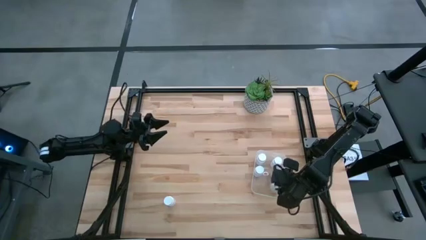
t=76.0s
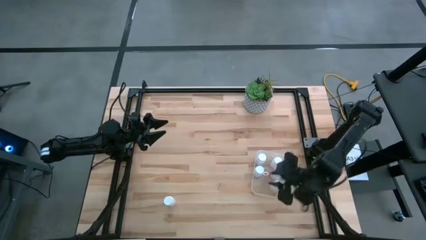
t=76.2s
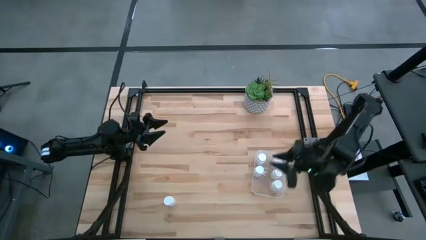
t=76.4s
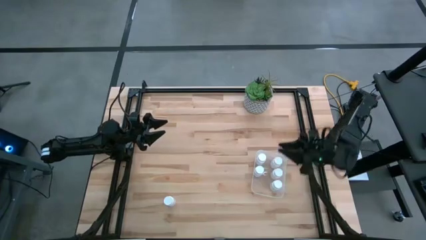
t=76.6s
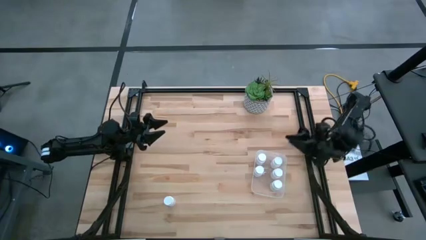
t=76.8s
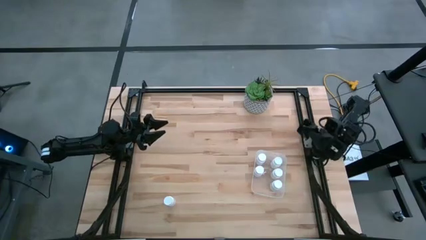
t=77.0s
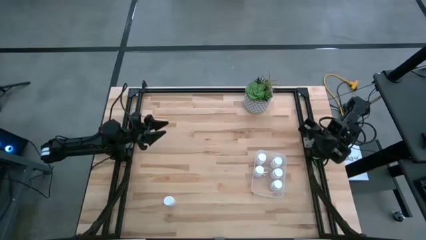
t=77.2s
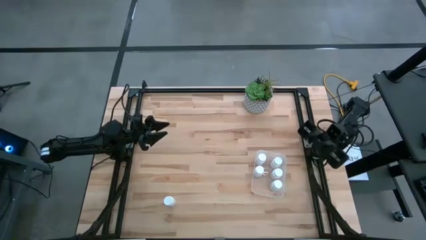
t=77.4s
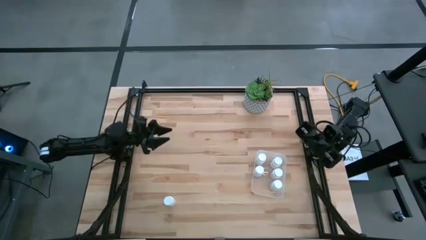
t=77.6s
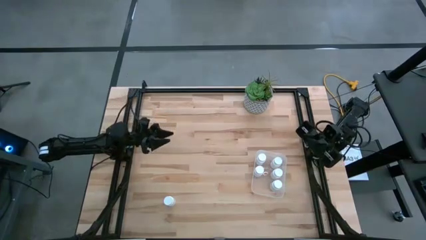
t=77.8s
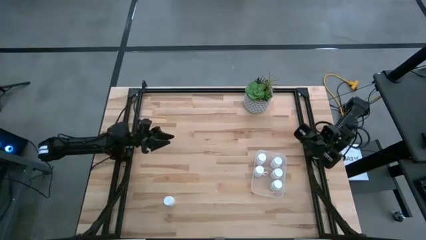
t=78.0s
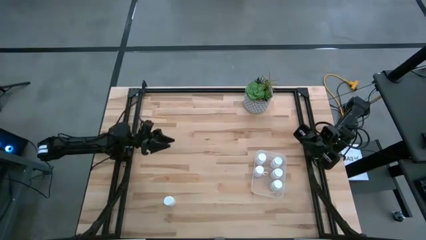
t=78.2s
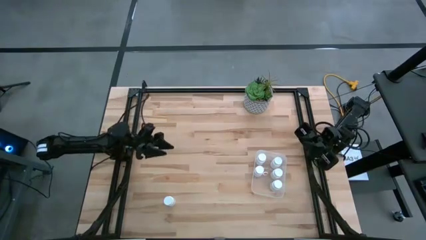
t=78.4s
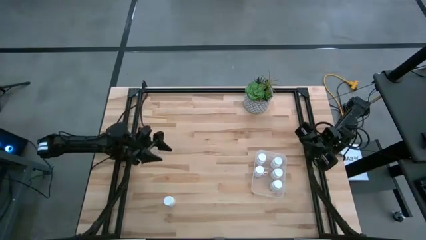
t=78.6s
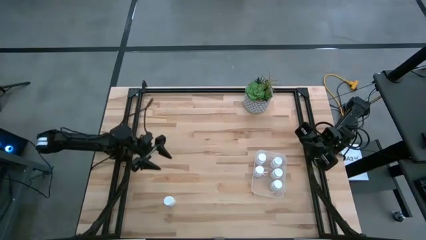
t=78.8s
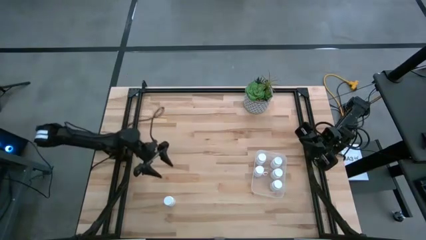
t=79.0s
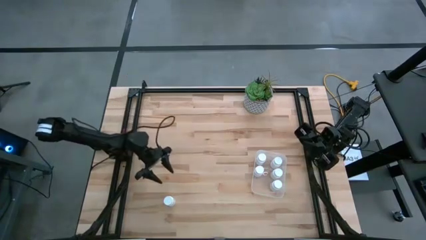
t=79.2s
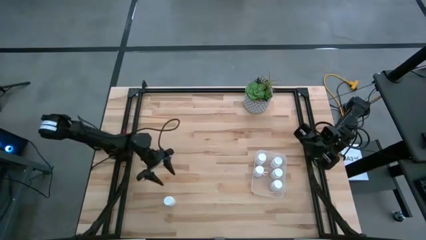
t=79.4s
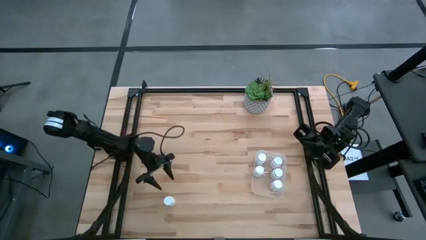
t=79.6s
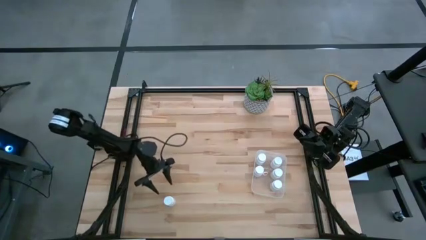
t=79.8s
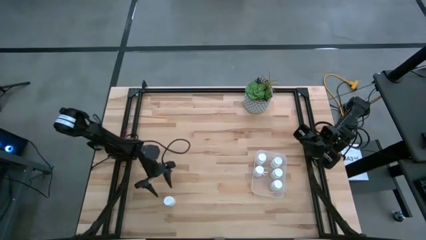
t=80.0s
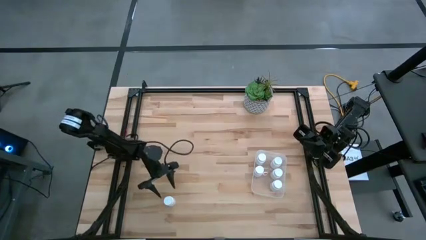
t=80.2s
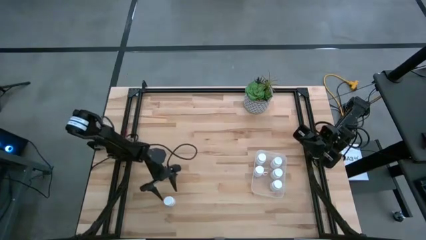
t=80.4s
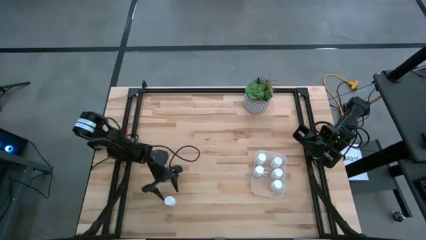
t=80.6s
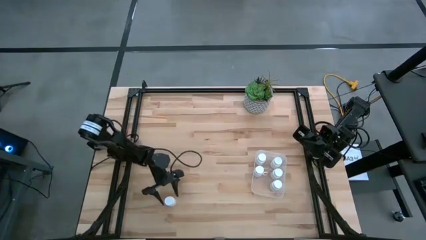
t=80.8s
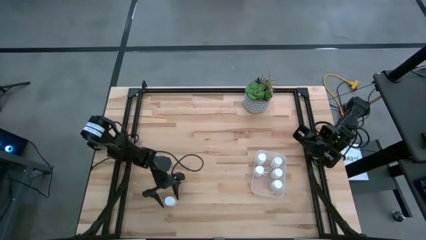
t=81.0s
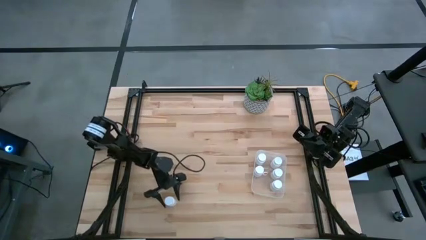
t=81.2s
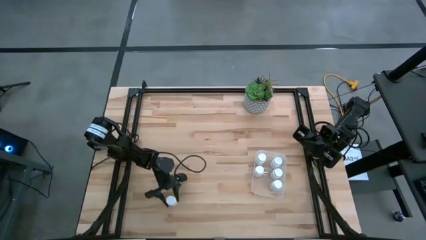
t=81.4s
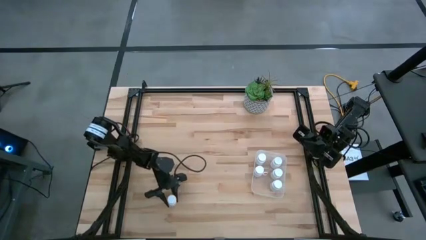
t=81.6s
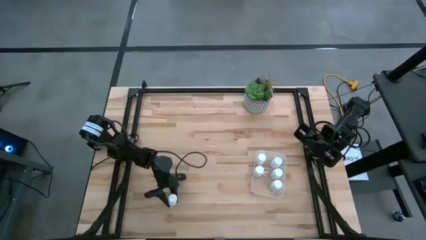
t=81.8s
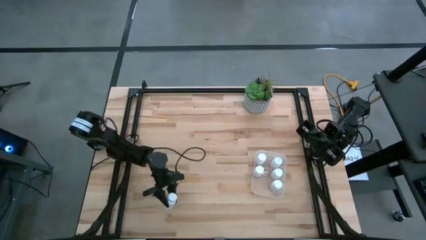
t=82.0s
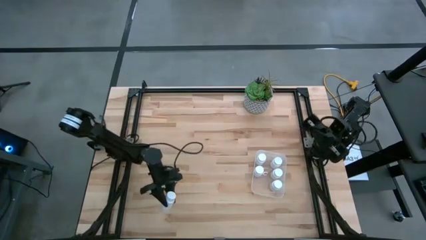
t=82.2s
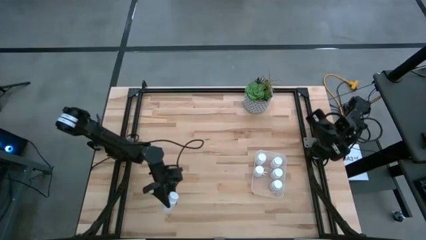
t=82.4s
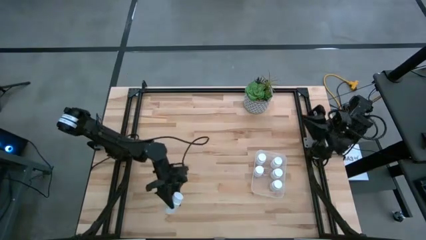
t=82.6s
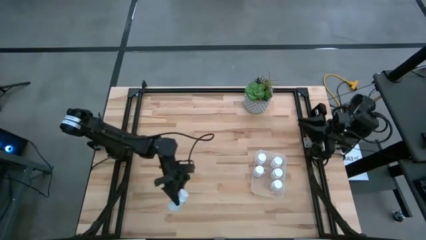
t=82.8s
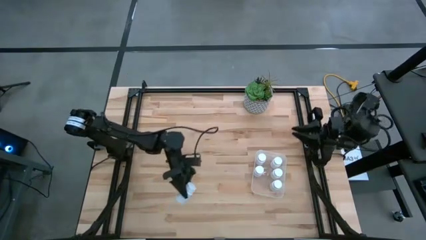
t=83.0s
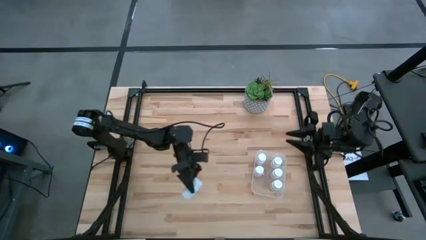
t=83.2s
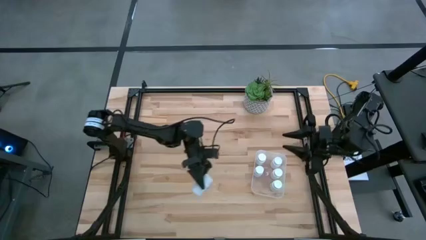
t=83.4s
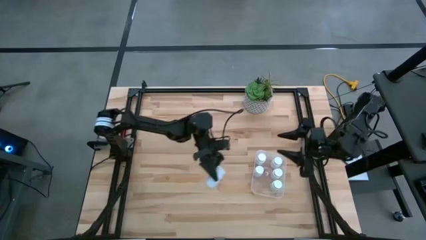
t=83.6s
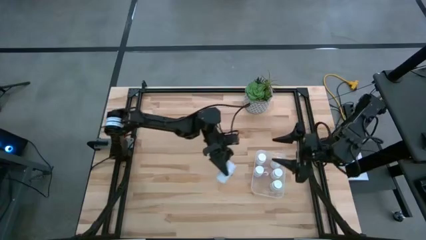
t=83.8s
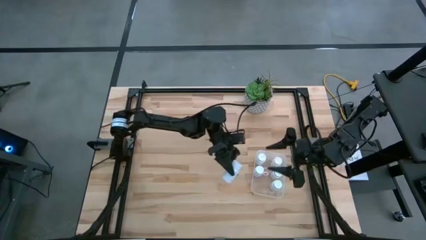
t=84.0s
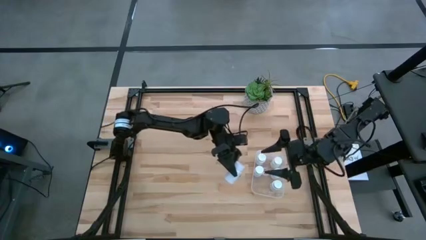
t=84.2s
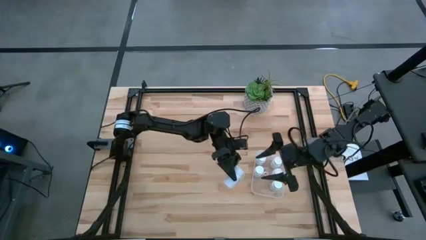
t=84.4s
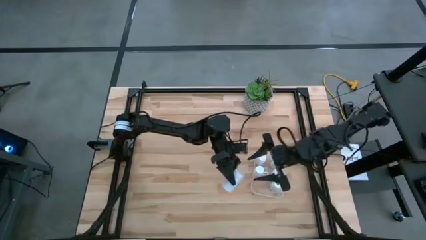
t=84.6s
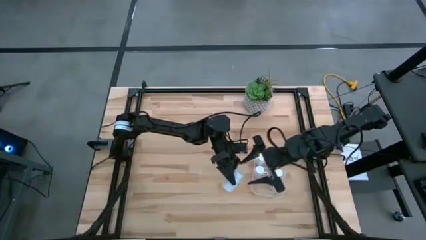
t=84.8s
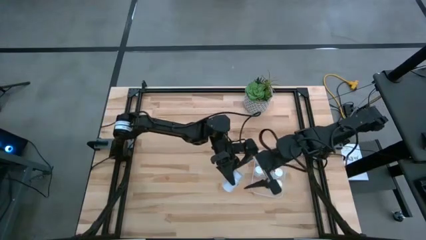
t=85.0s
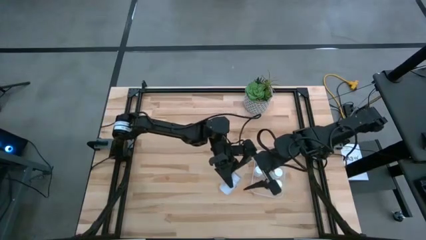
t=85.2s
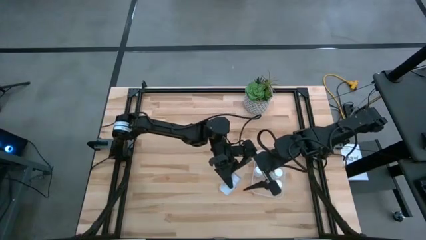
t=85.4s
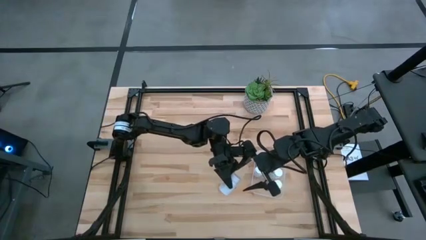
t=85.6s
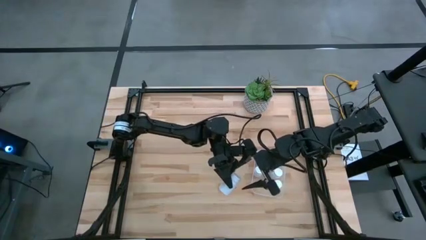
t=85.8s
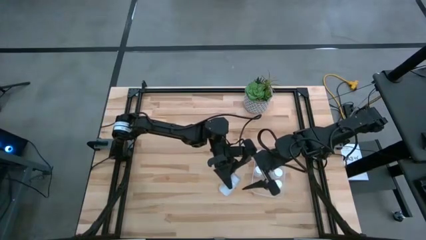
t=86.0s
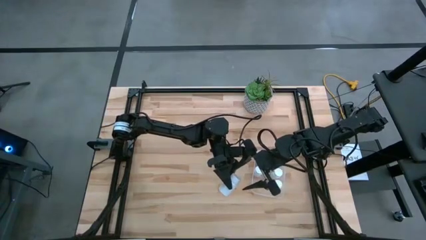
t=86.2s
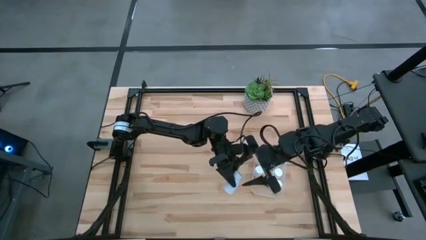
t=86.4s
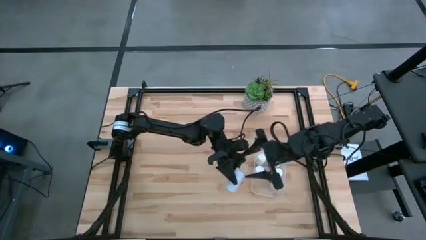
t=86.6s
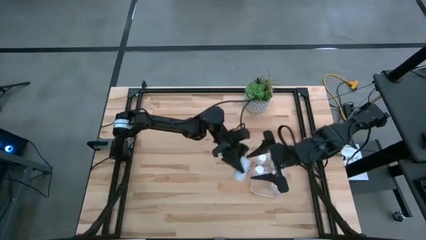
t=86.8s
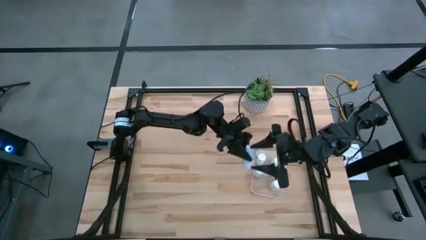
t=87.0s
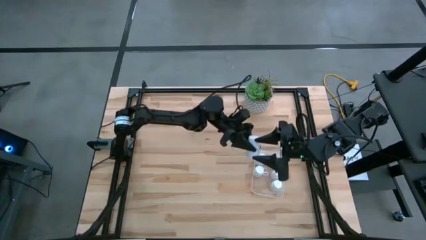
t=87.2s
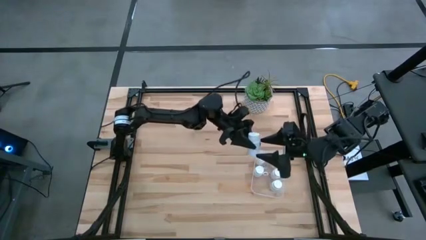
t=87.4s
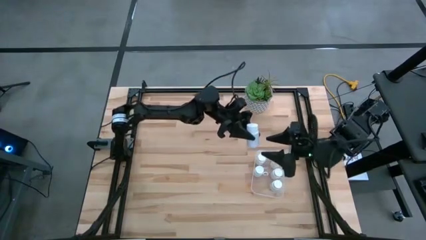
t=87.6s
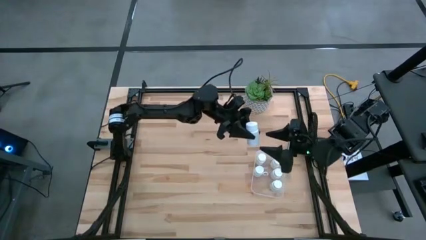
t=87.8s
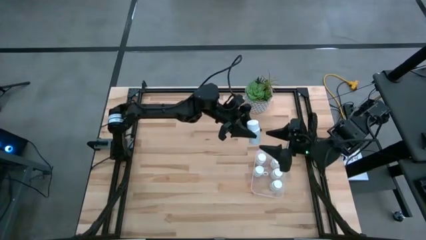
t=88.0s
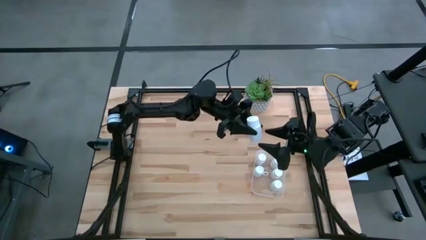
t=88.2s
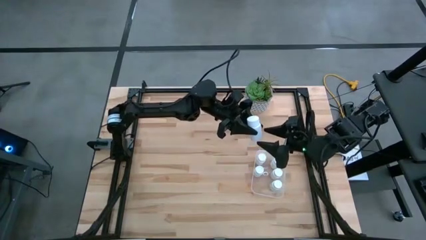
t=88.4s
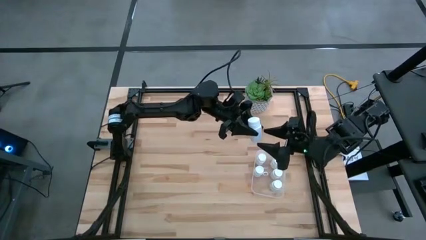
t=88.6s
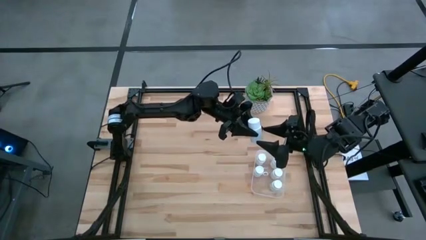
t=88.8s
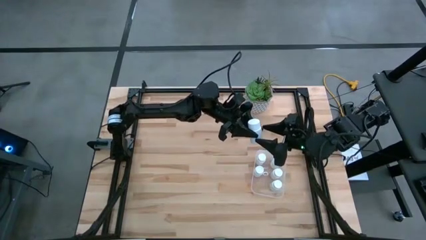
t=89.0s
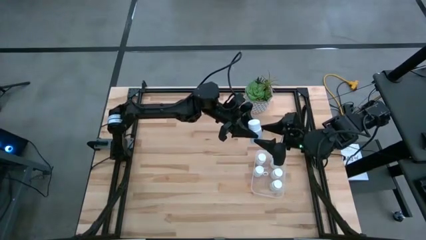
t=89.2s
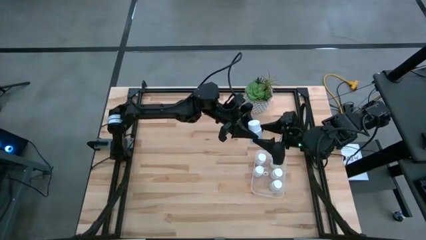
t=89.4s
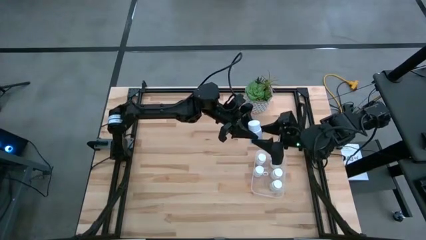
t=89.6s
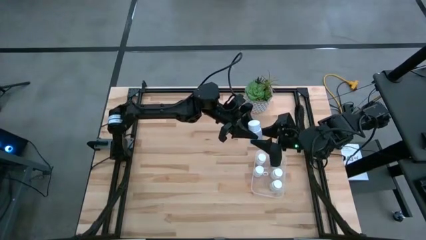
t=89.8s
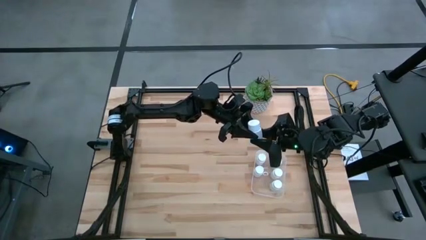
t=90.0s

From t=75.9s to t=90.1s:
Task: Pick and place pill bottles into a basket
Put the white medicine bottle into the transparent bin
